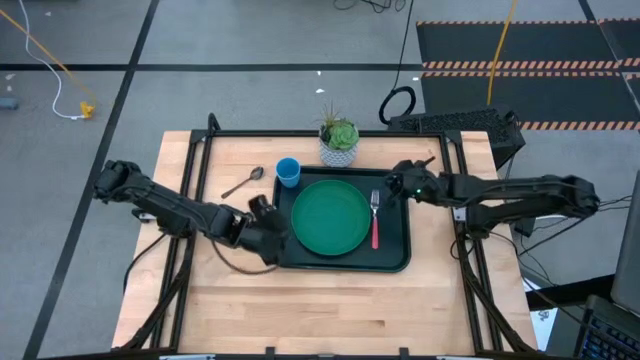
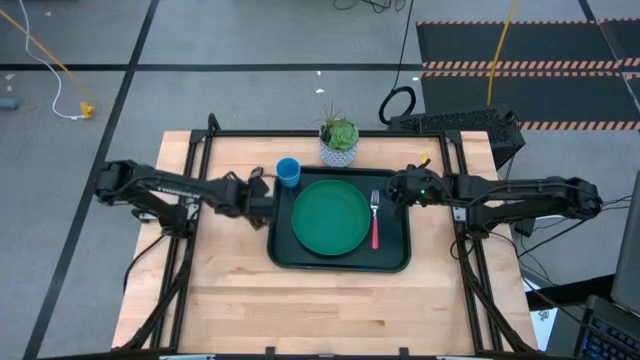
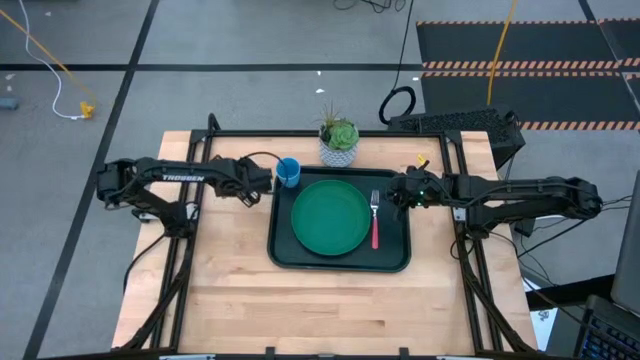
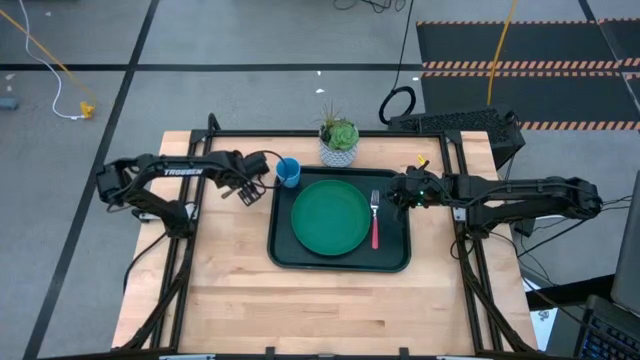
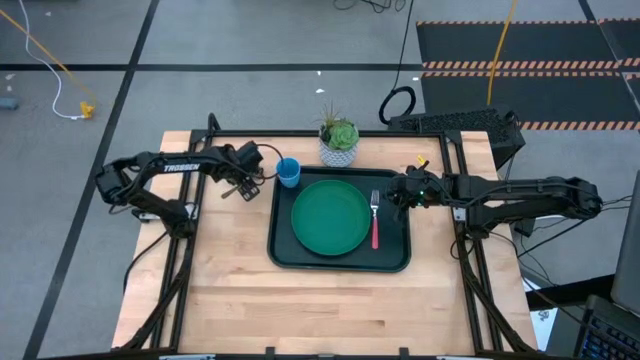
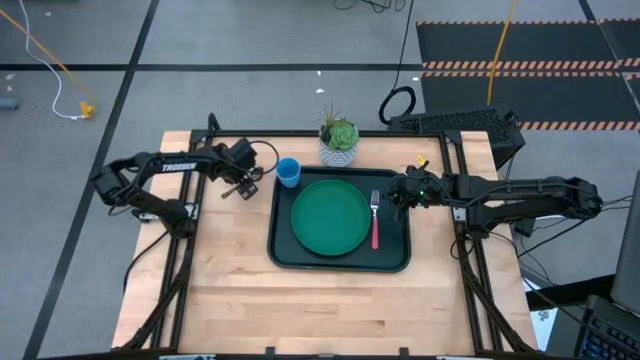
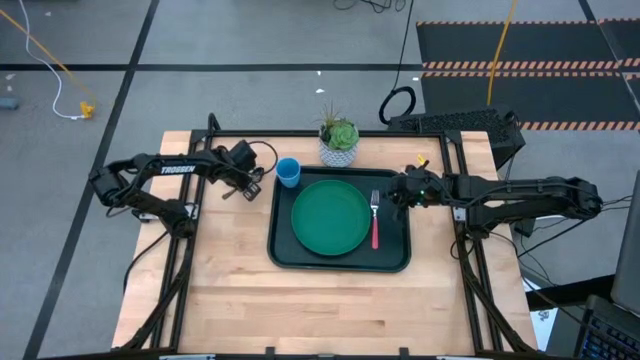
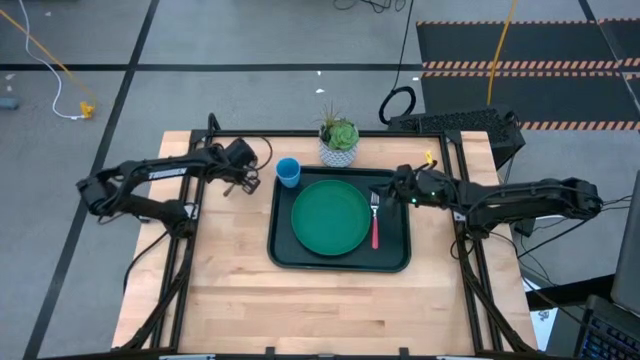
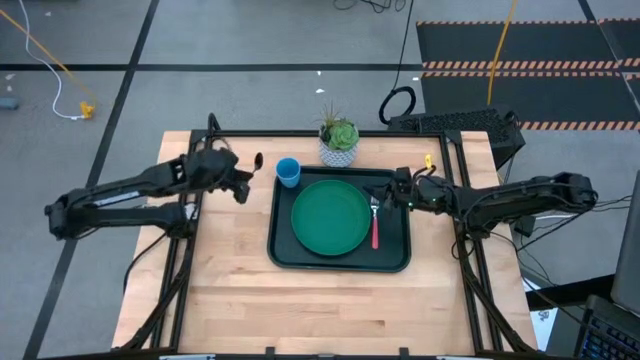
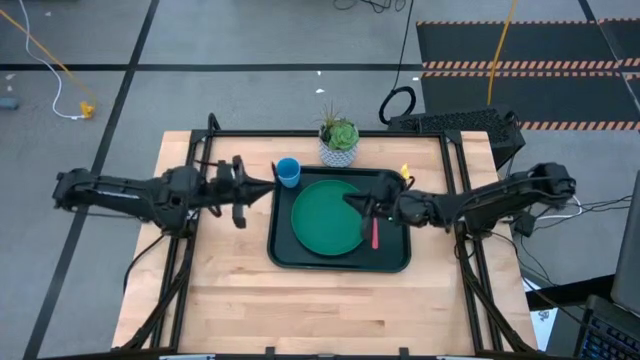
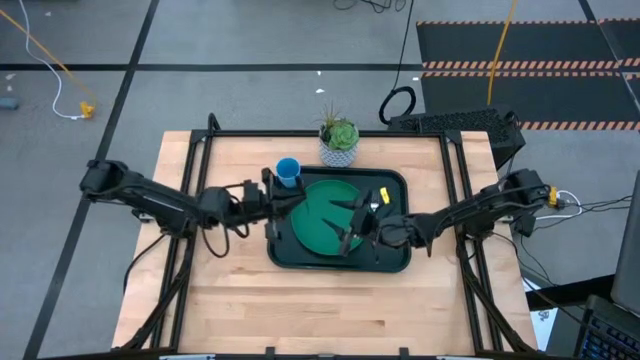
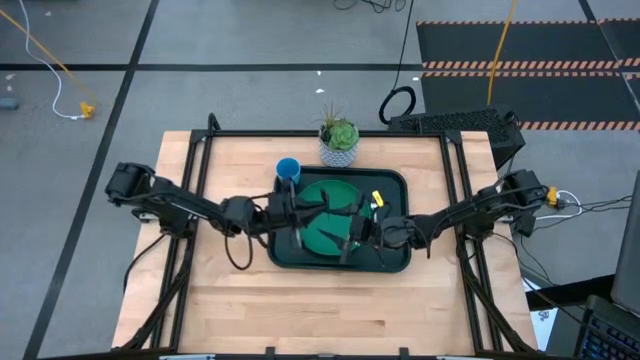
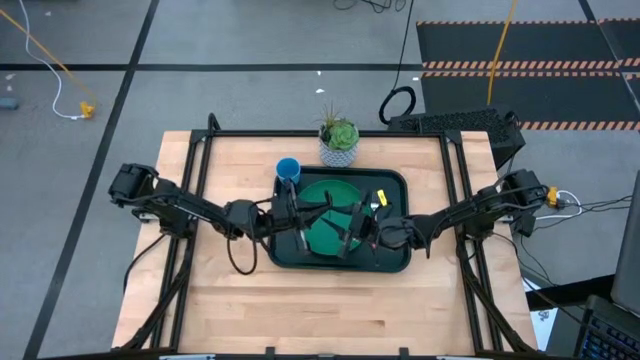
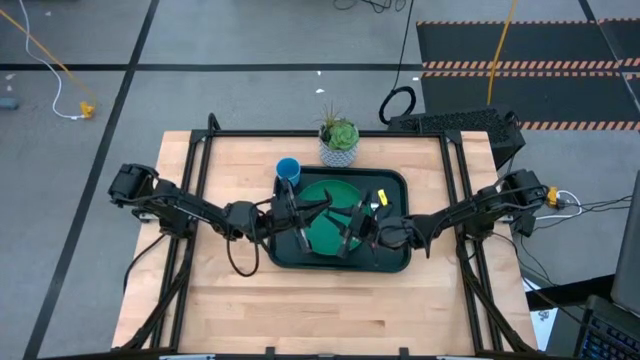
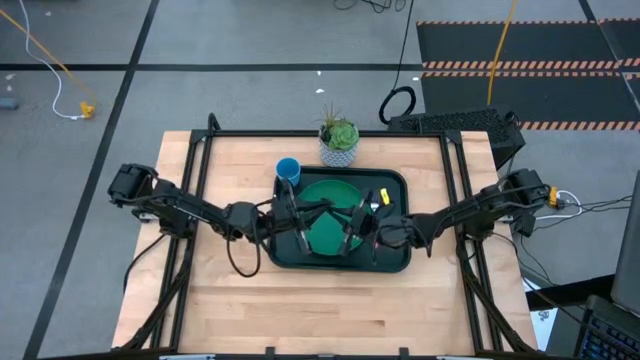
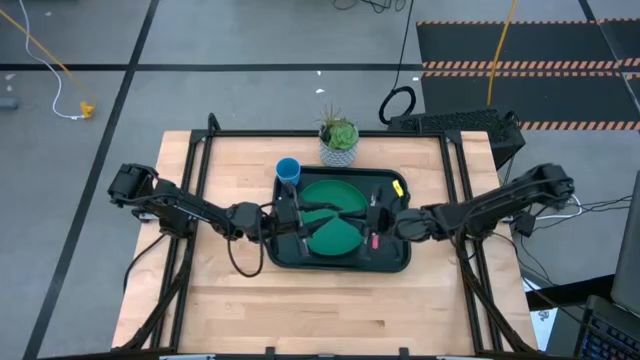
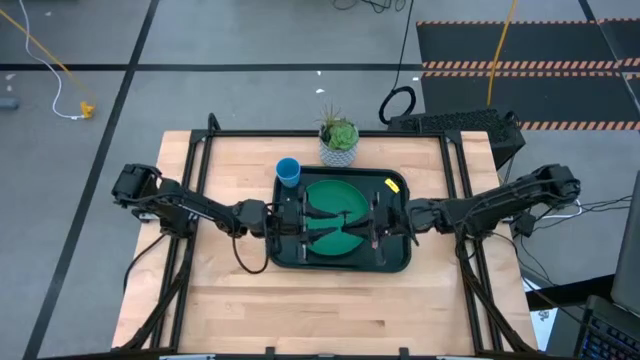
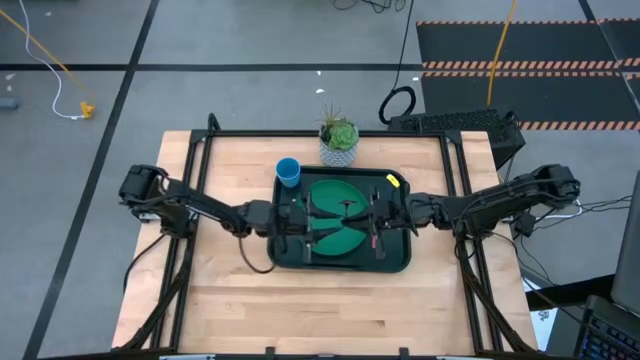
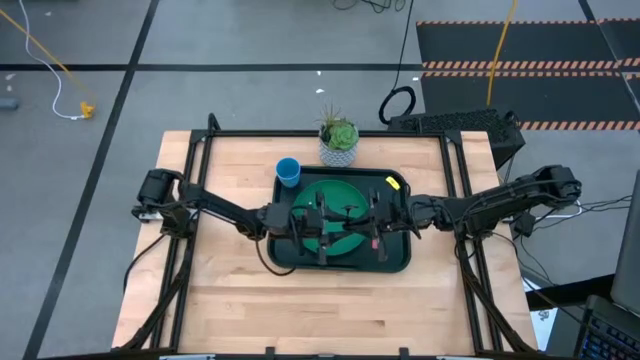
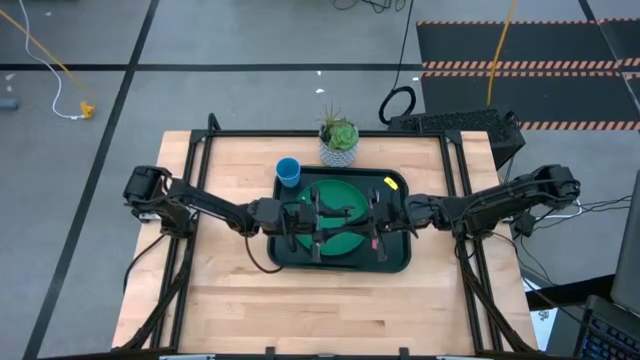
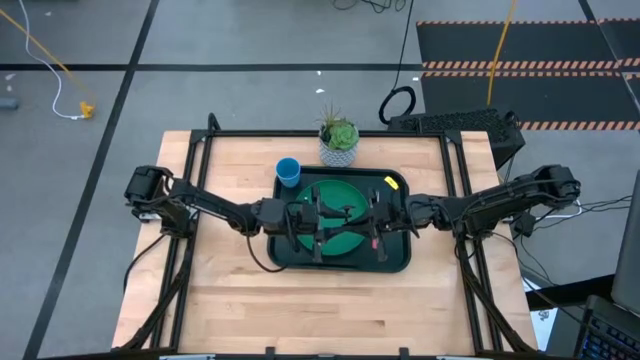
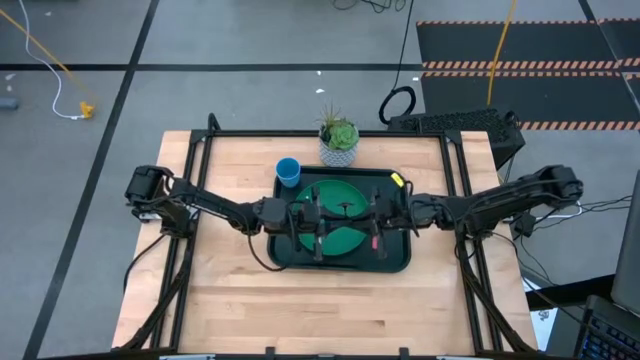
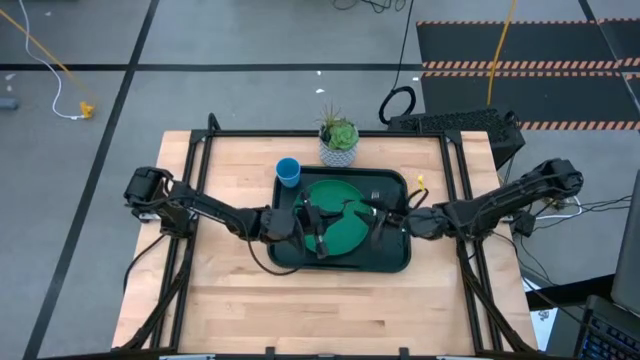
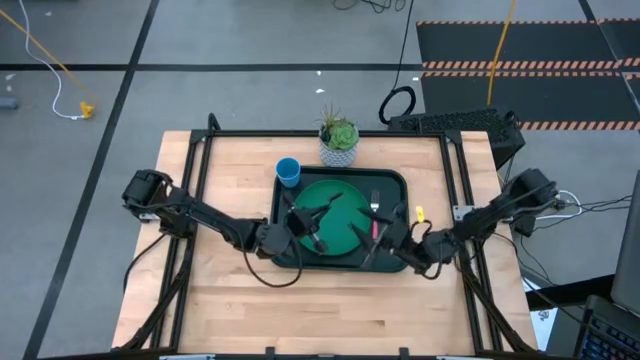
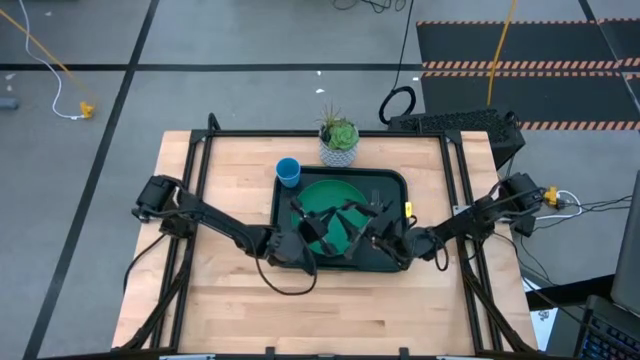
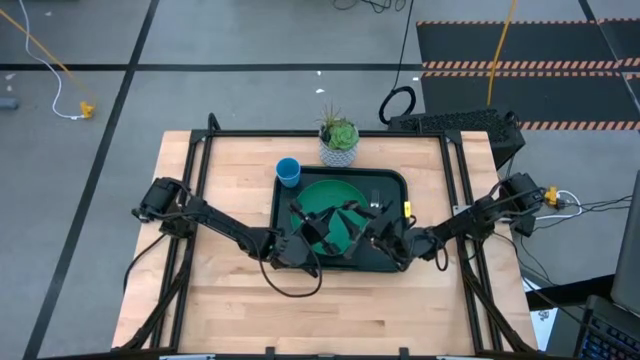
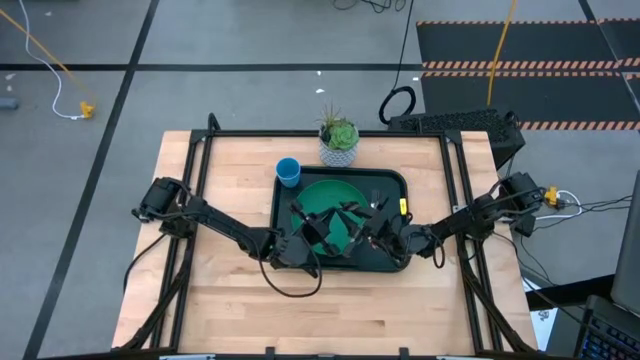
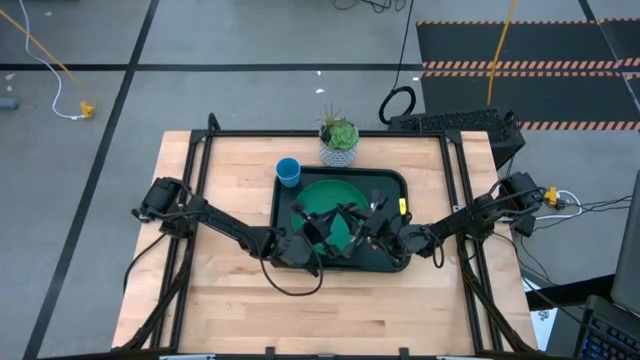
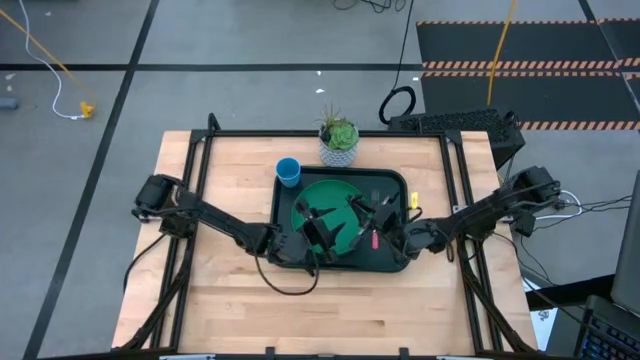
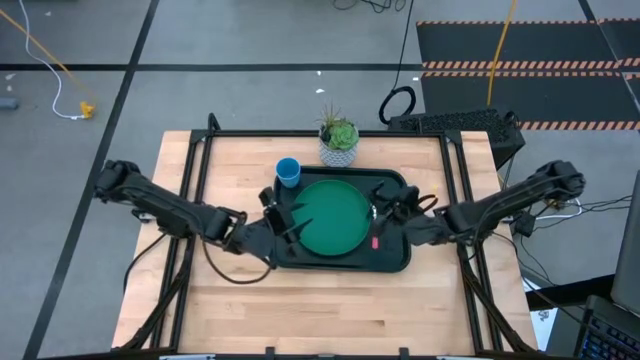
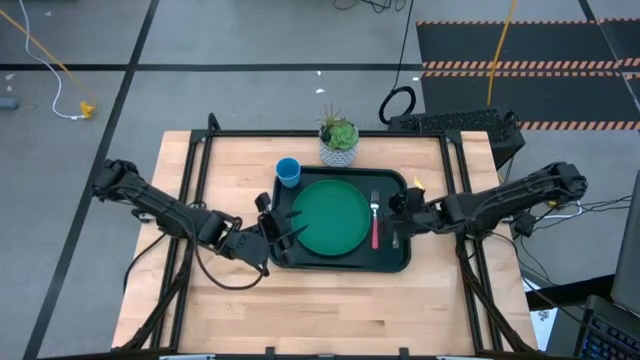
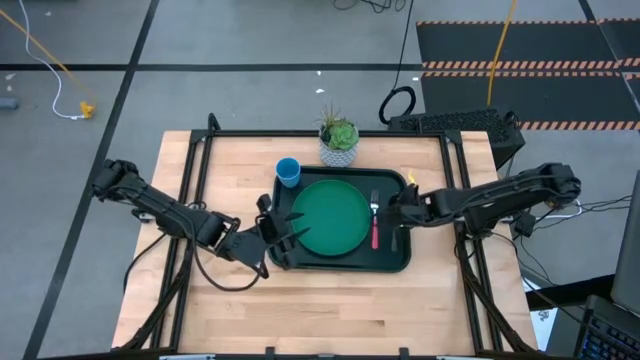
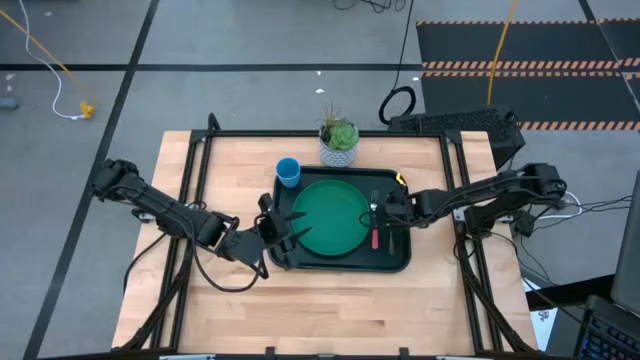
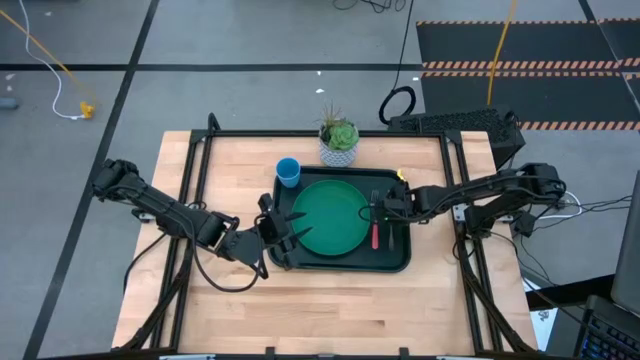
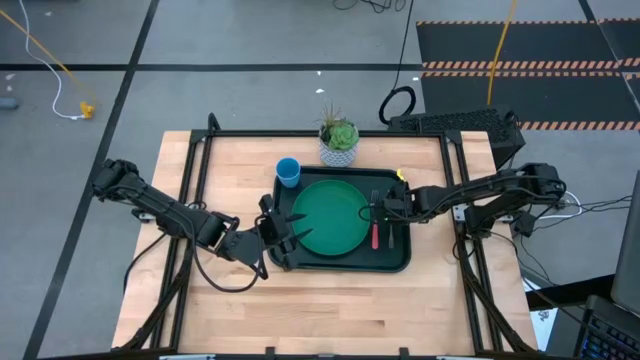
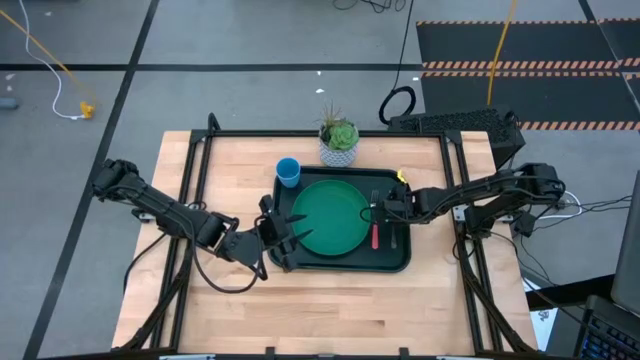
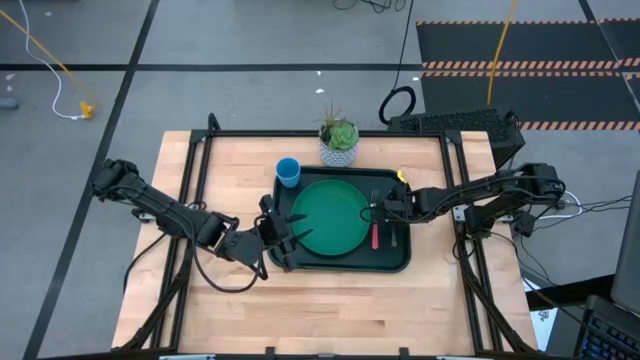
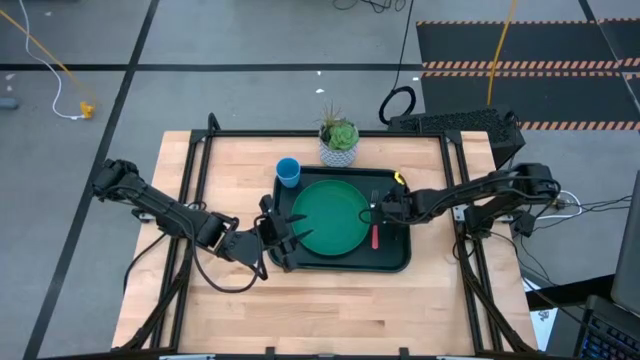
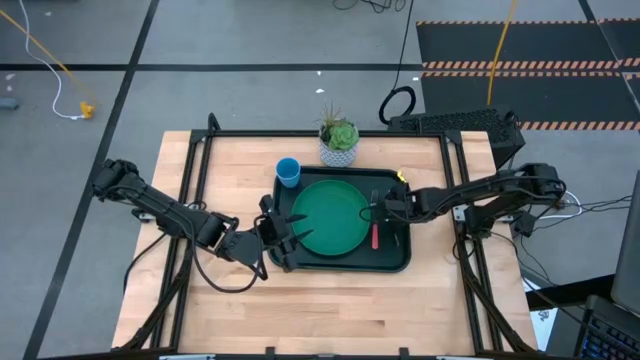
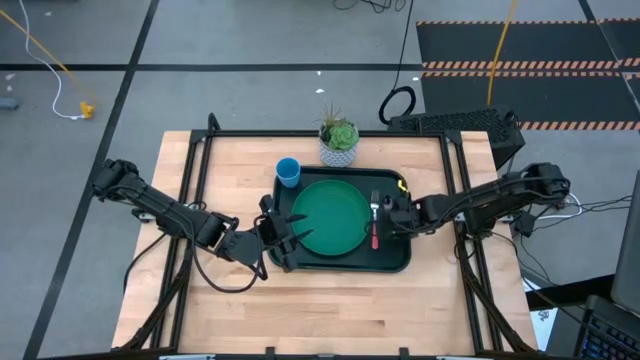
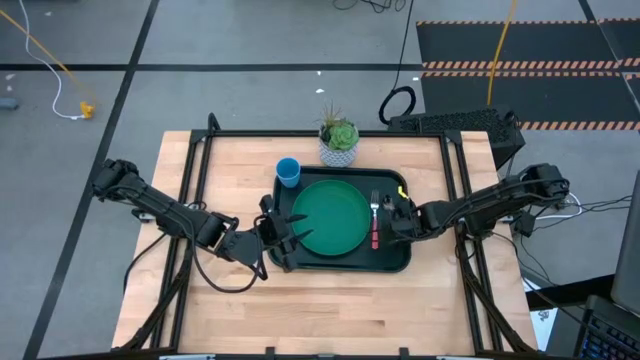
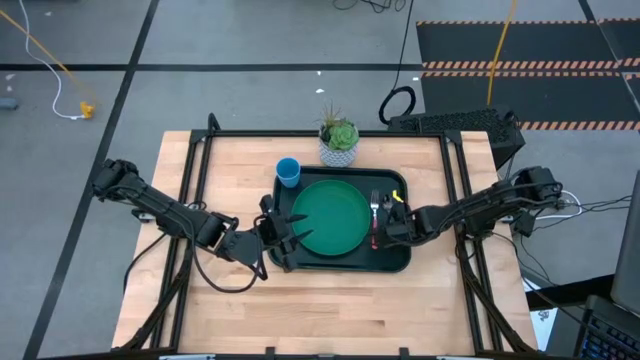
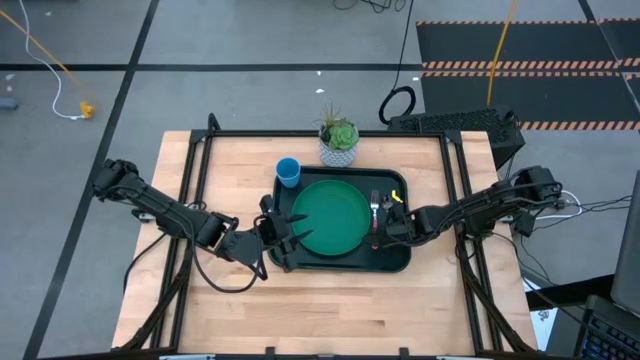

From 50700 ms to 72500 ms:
Task: Pick and place plate/cup/fork/spoon on tray
Put the black spoon to the right side of the pink fork on the black serving tray

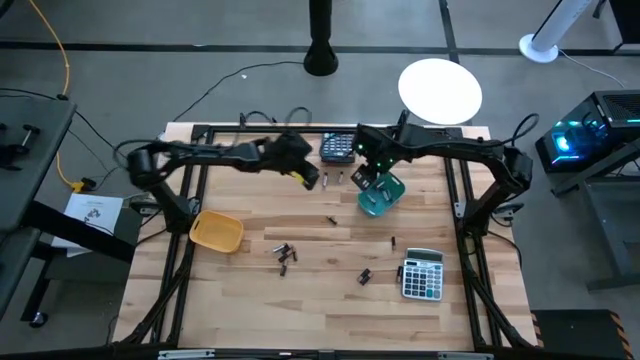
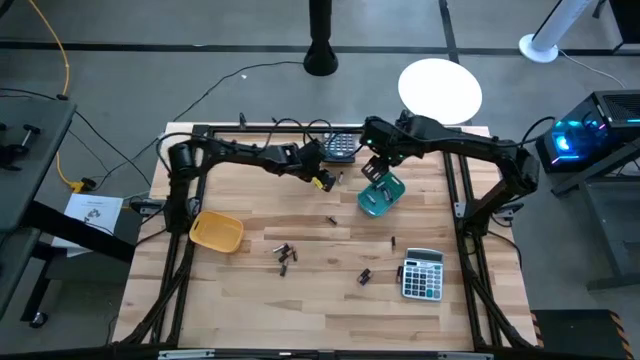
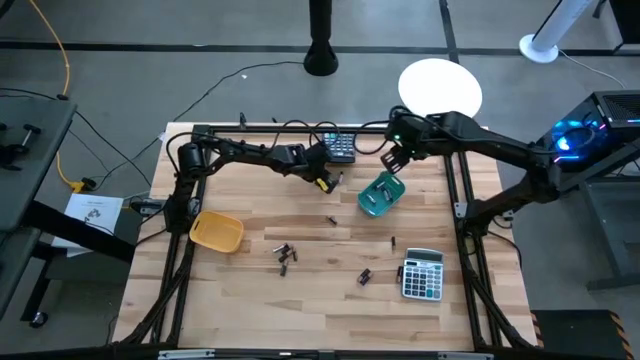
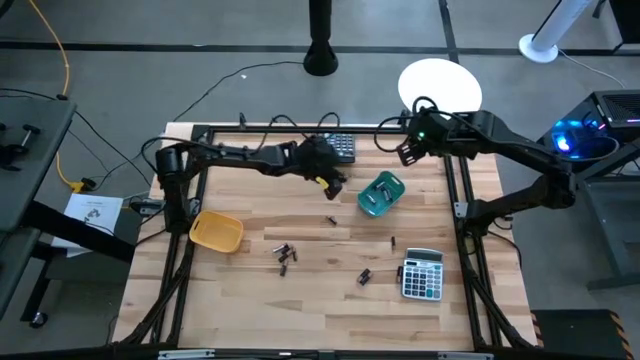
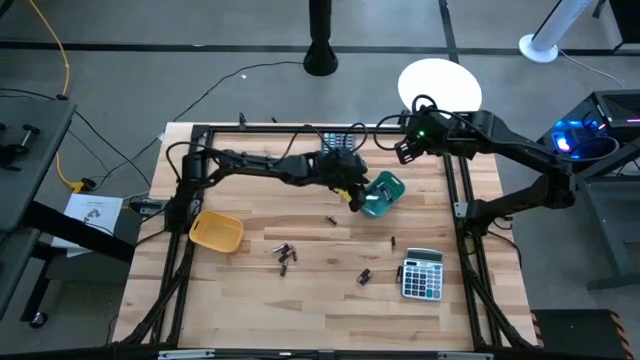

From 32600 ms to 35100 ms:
Task: Sort batteries
Put the silver battery into the green bin
